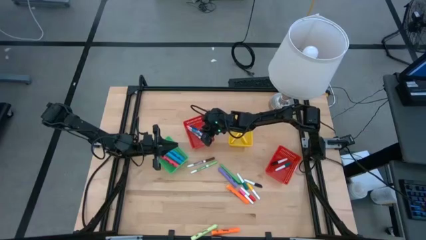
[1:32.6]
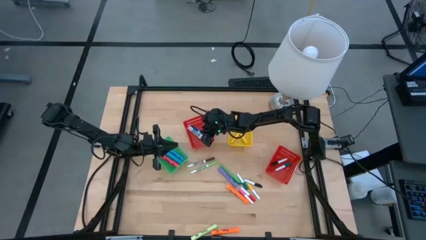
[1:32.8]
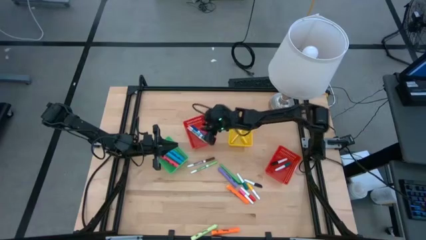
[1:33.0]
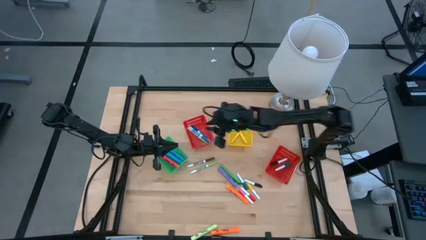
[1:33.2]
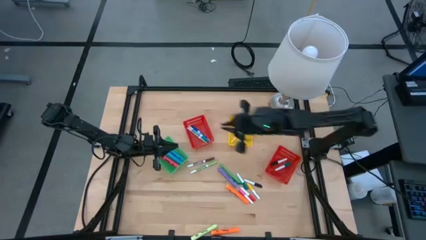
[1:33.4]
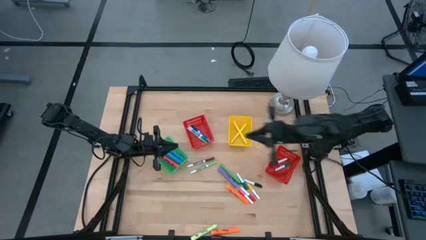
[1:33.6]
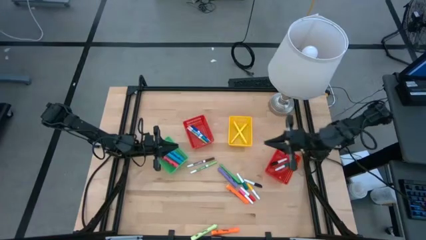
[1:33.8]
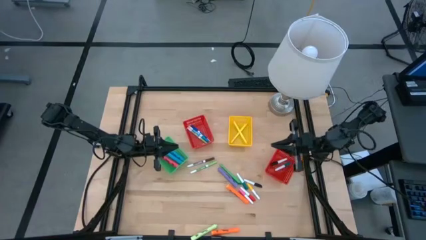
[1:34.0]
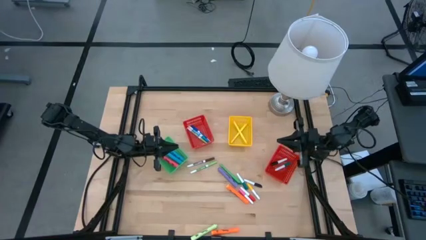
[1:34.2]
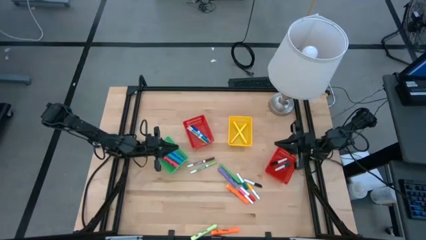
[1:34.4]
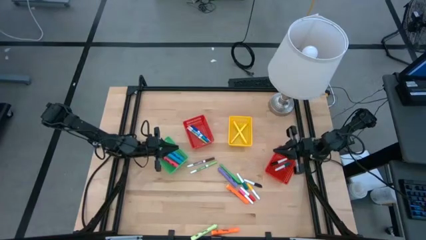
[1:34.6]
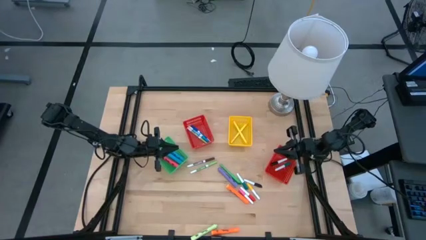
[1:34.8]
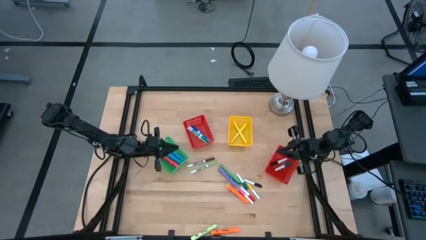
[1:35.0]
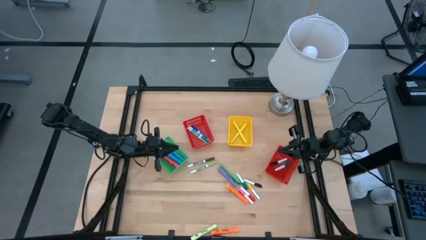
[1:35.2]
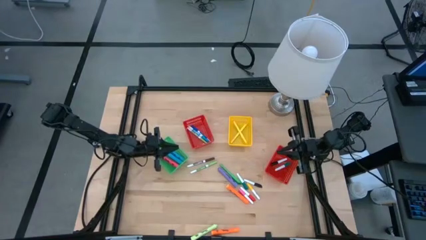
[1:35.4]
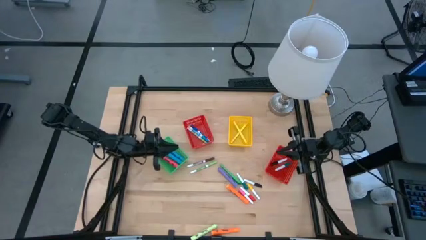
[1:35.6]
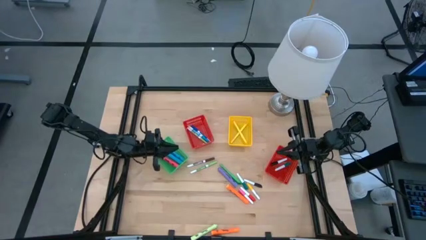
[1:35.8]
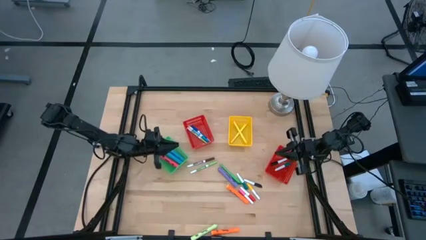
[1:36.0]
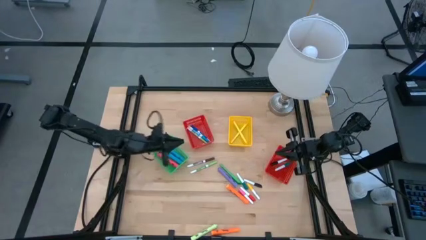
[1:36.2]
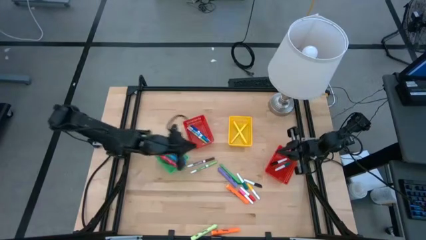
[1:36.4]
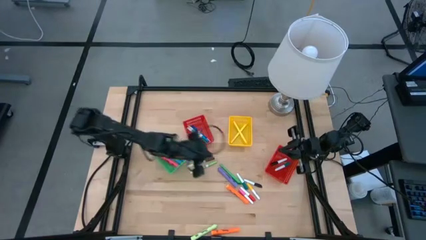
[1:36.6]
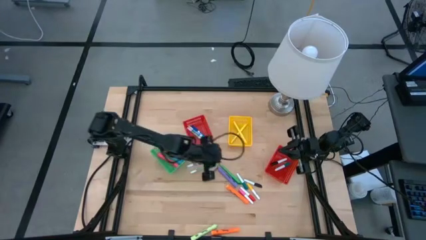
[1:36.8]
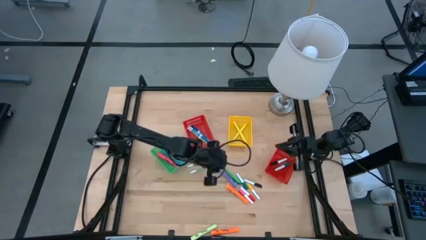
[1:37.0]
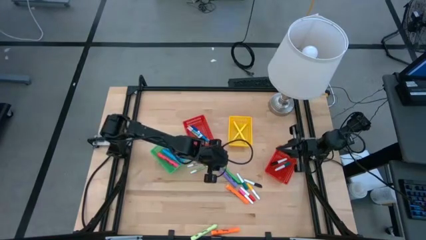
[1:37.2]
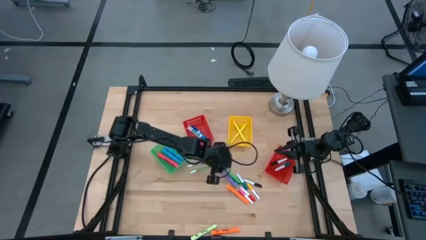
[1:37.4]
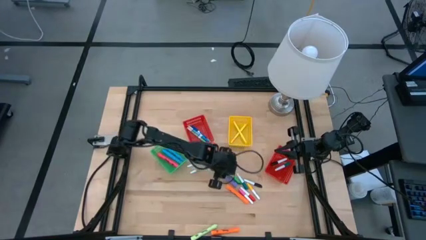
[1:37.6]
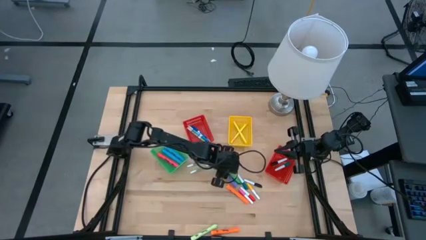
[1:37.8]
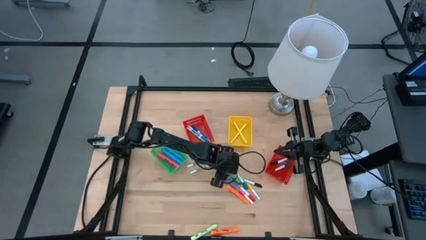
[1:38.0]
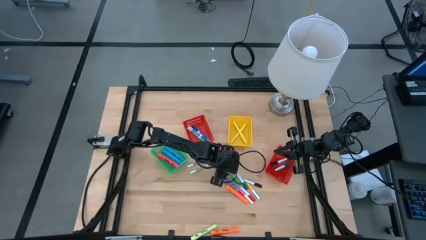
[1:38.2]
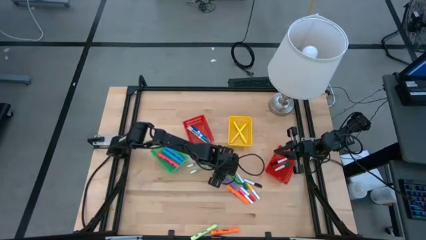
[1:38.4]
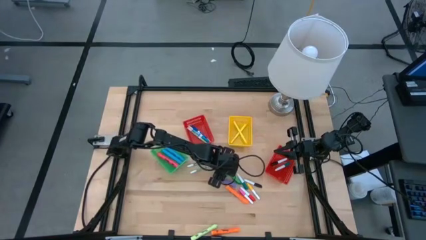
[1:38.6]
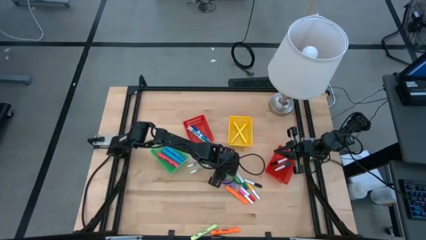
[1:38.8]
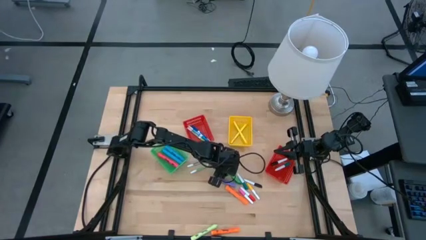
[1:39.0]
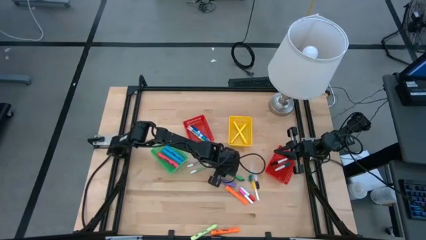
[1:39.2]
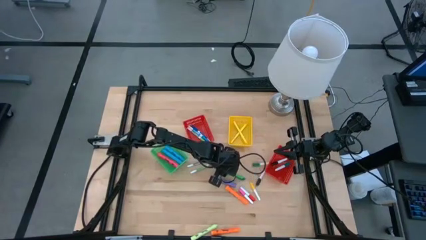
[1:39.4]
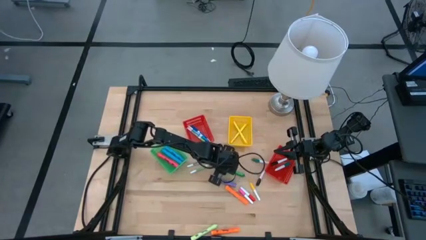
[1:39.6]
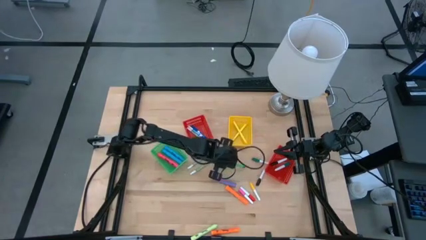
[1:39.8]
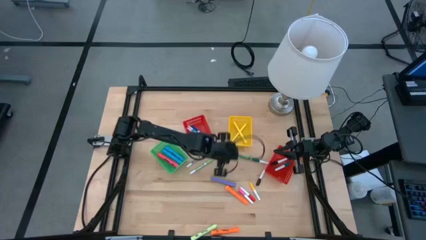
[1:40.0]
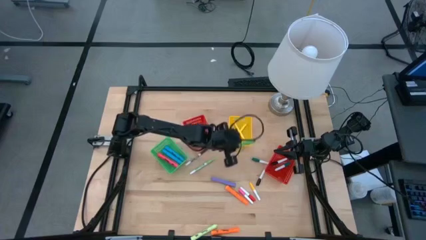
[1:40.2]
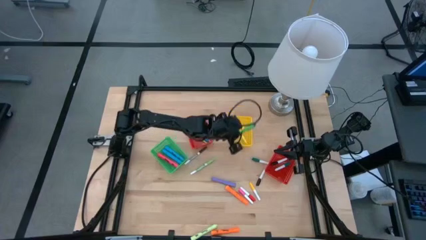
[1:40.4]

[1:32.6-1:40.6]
Task: Pick & Place Markers
Put the green pen into the yellow bin

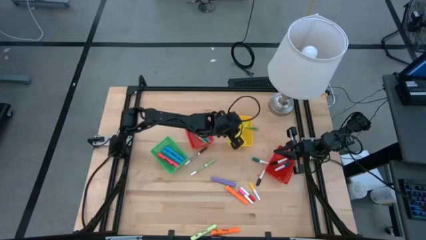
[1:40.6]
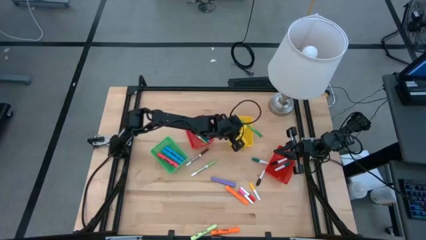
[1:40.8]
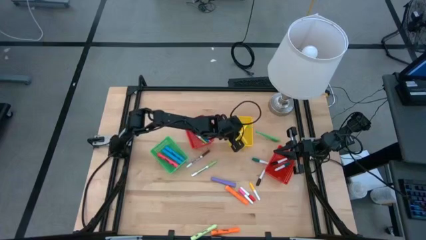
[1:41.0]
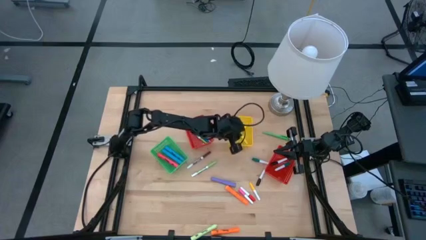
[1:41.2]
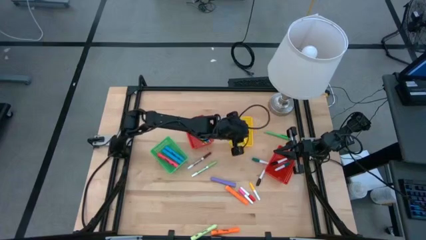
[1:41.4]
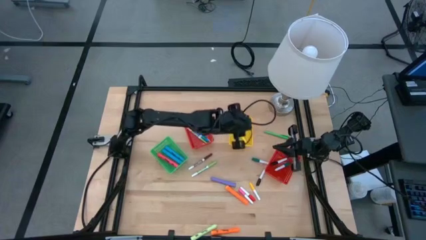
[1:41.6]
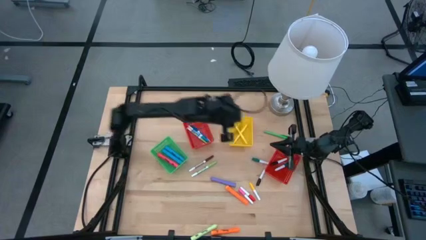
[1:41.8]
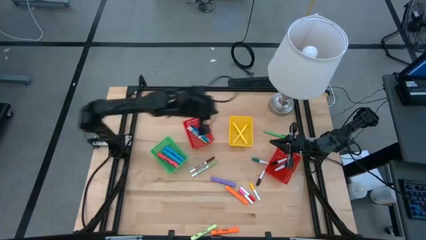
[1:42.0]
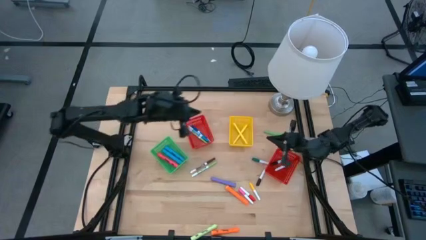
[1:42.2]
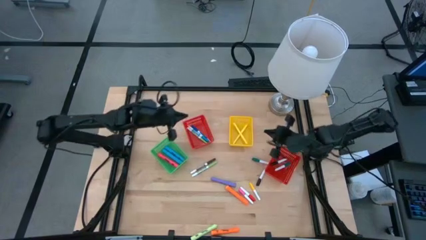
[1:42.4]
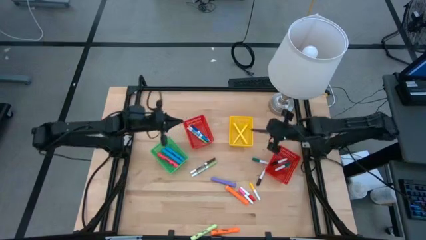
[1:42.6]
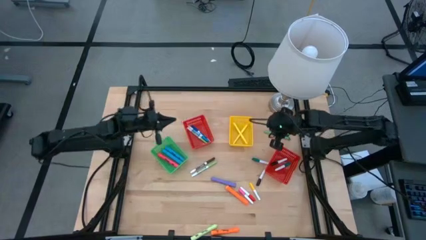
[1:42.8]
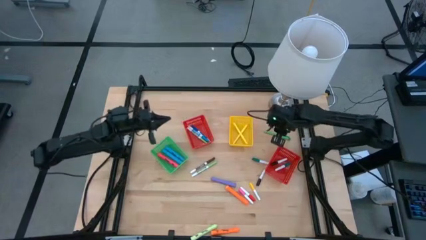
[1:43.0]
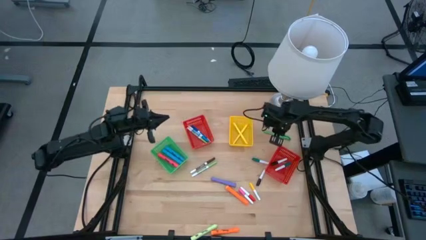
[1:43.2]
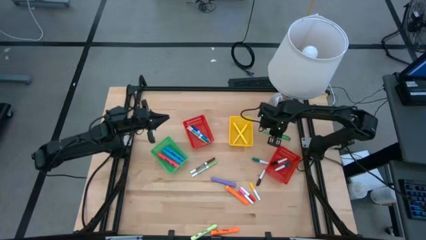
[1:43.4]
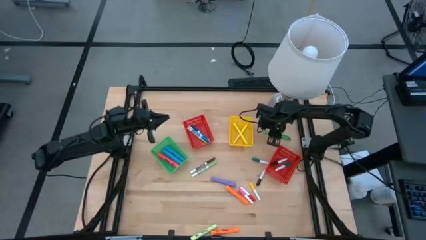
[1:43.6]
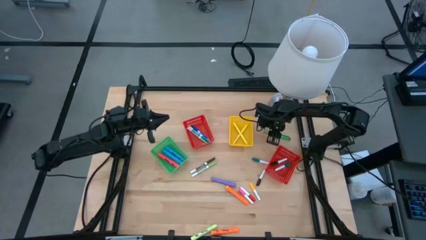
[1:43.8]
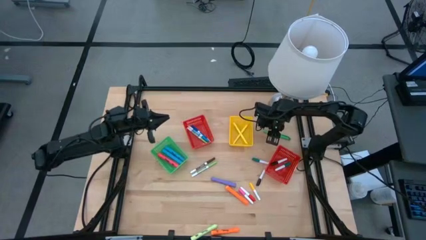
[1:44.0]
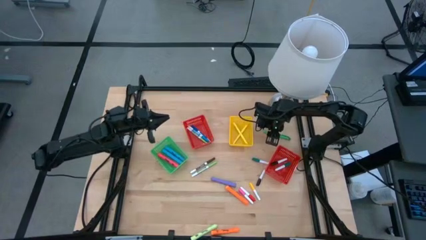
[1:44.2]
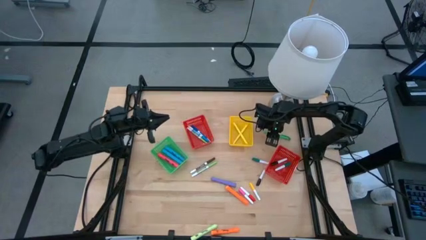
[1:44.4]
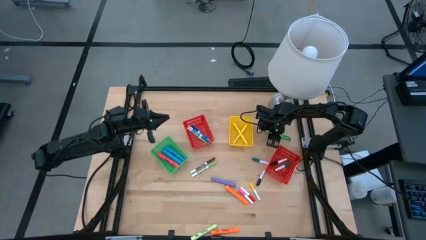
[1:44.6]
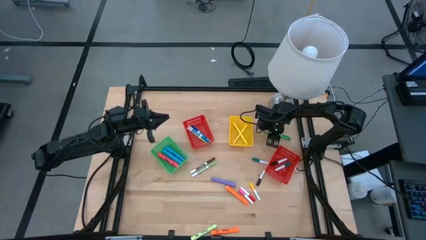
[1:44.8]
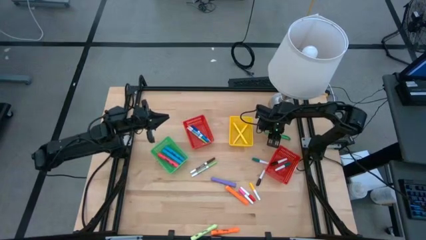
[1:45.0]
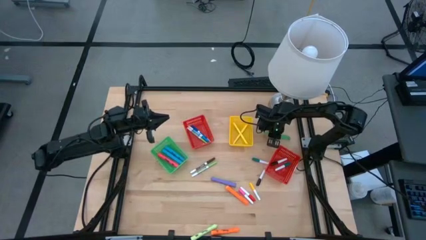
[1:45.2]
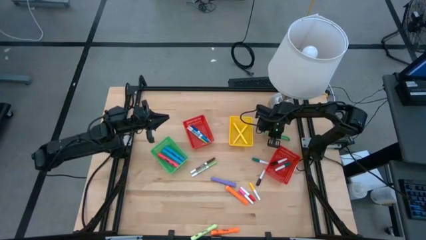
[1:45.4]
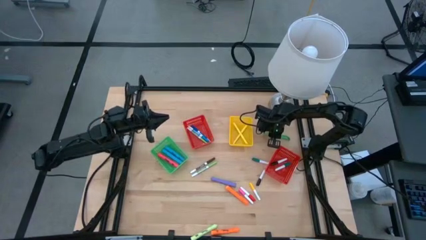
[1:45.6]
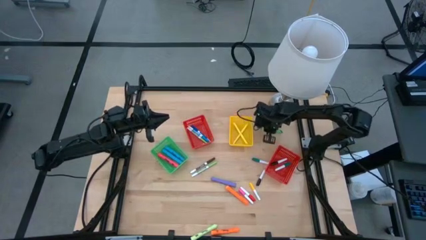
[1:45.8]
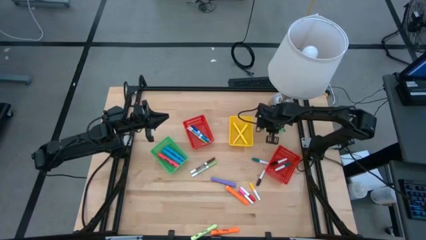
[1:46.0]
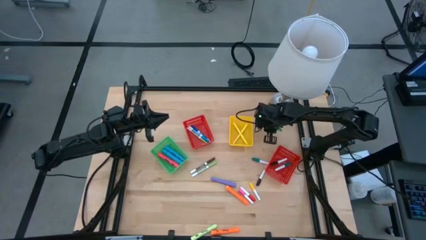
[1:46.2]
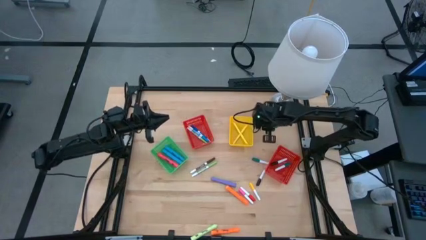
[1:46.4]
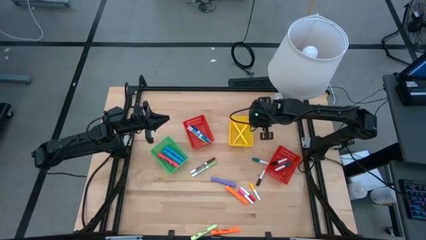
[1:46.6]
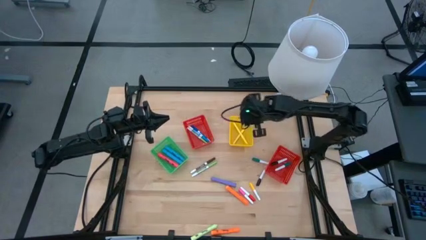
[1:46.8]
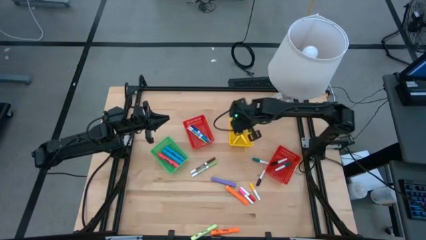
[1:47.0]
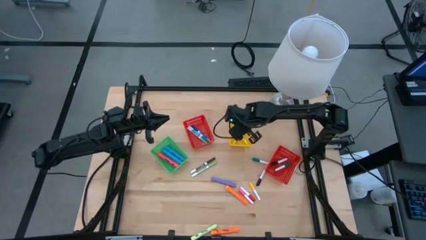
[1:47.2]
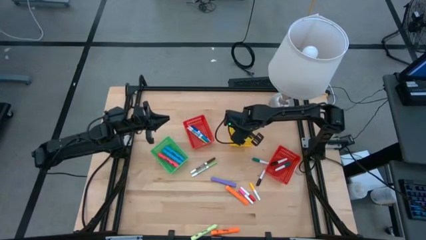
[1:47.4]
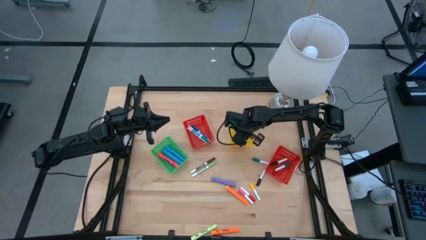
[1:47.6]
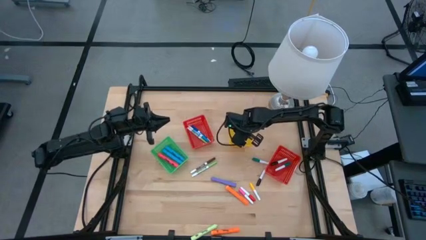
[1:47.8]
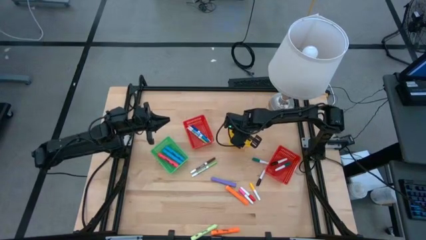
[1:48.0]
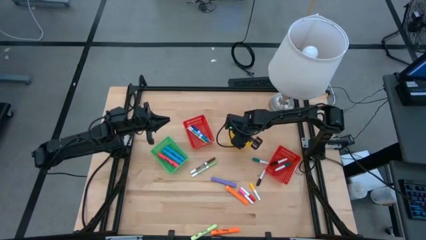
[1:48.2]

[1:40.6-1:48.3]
Put the green pen into the yellow bin
